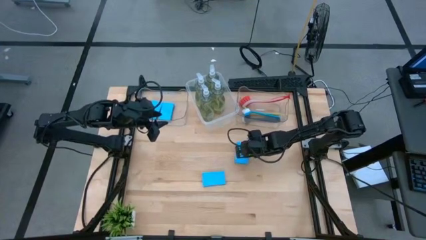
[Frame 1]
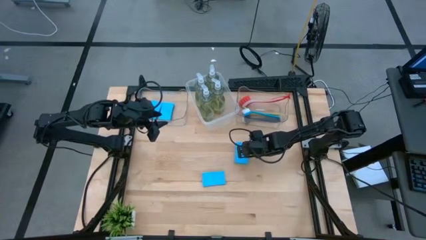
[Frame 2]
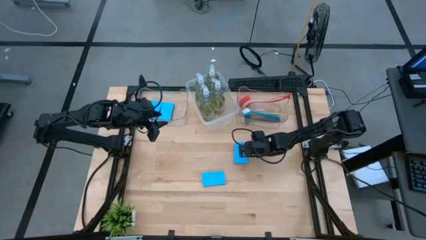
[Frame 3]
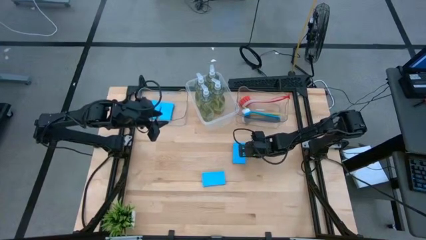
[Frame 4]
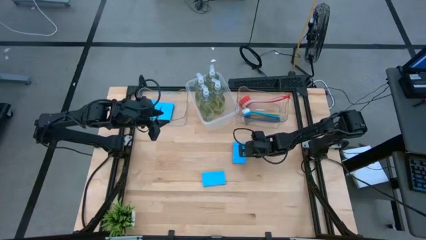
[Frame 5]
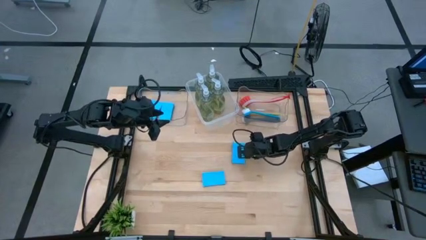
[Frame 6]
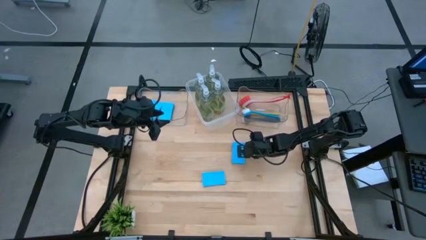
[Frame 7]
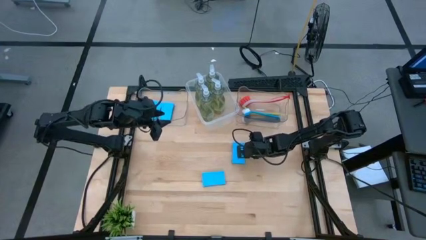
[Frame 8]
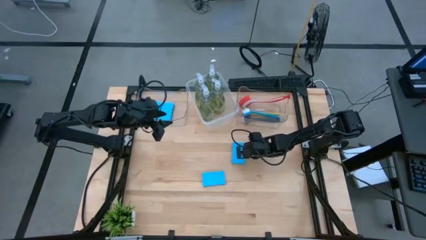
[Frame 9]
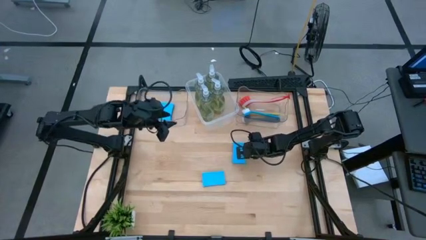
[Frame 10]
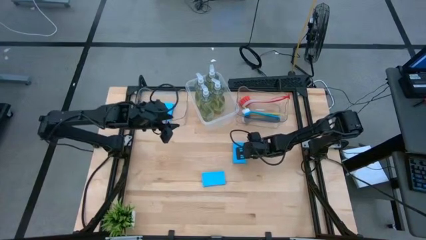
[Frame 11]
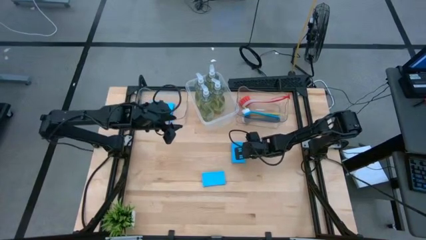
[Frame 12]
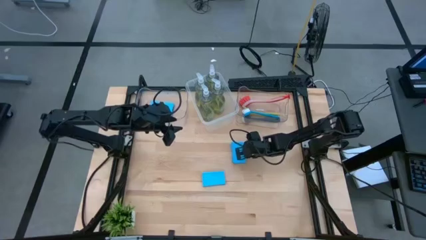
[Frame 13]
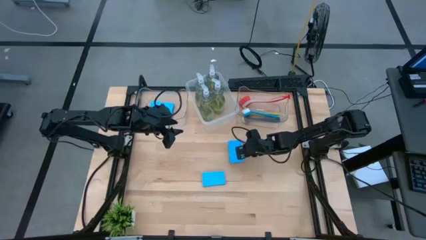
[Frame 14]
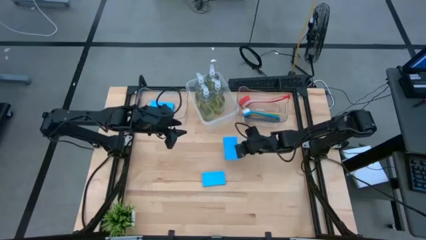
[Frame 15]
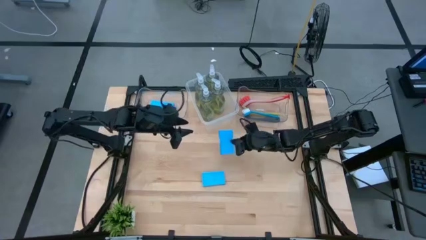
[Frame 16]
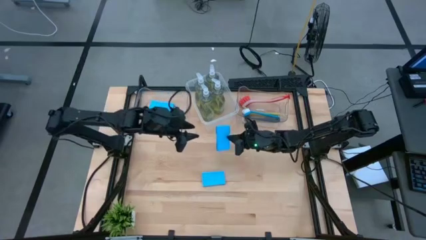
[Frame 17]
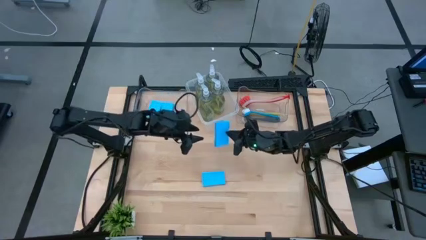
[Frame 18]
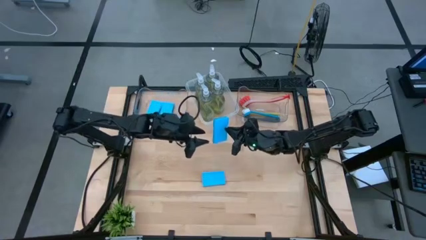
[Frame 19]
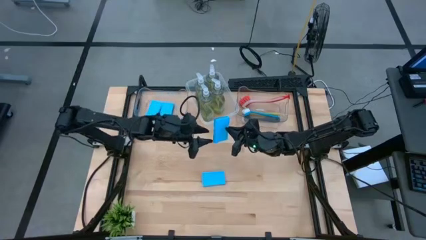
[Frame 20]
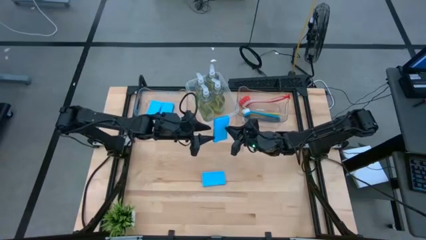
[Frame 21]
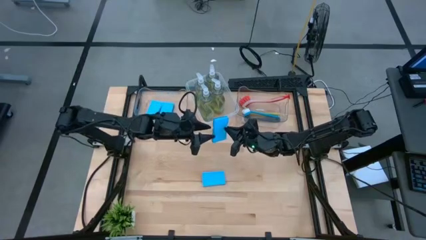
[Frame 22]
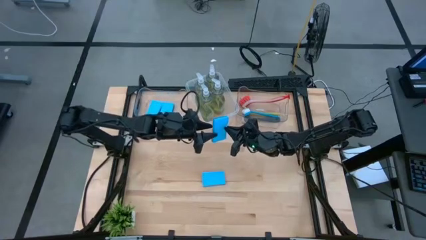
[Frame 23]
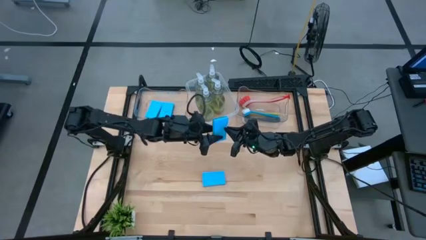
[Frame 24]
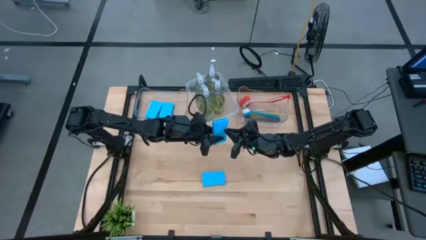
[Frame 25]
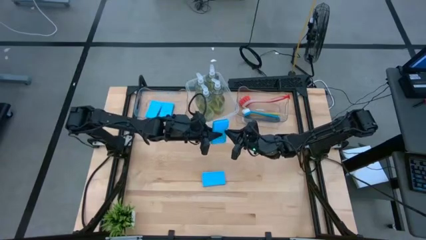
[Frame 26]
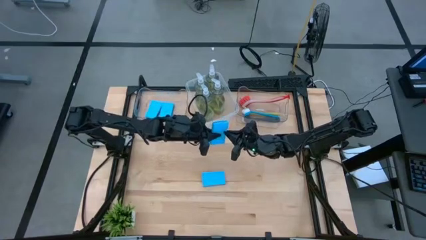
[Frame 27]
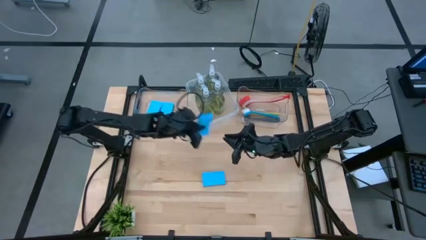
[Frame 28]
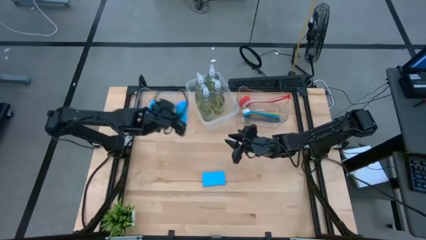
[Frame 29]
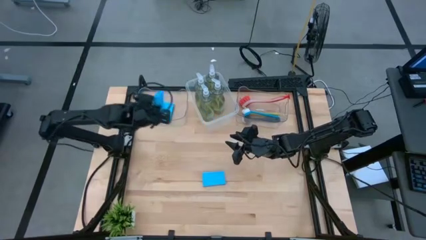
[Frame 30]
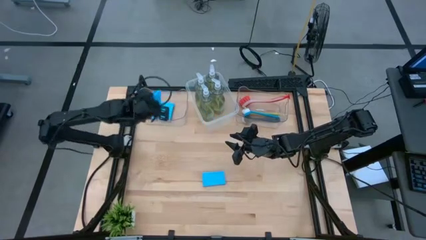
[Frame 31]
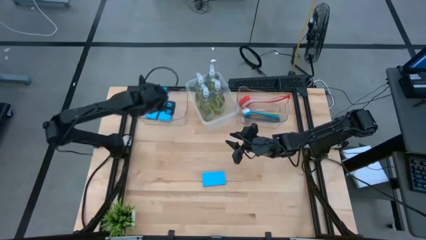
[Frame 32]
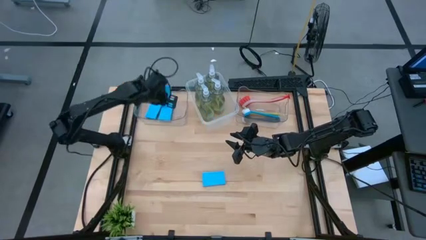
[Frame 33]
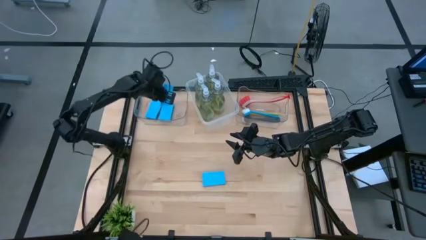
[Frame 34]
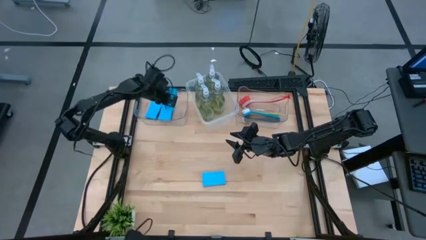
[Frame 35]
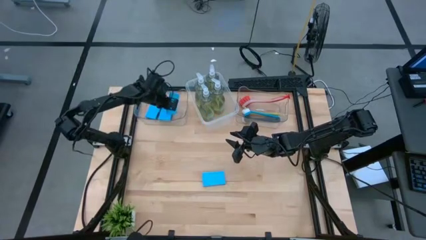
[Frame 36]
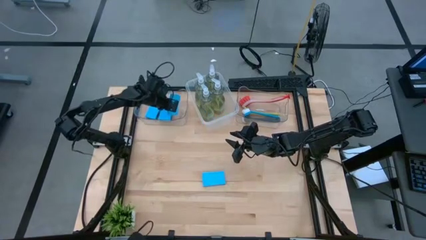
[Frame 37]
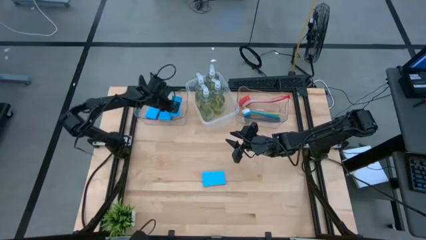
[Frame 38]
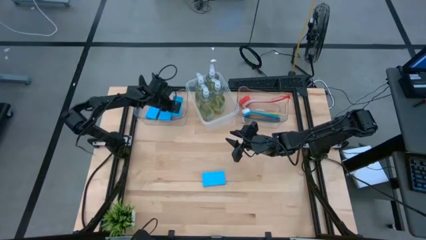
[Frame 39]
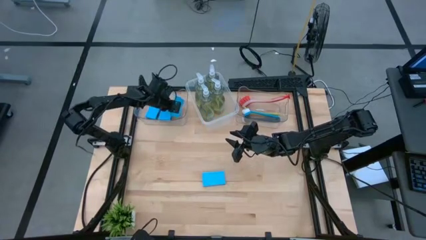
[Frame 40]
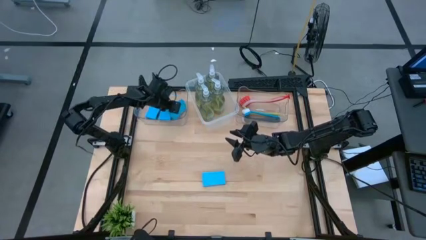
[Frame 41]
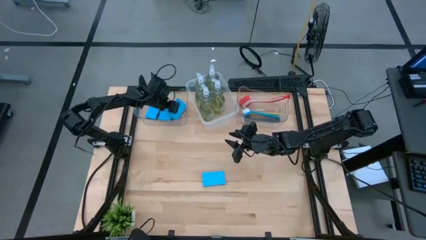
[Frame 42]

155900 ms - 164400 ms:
Task: Pick & Place Kitchen Sink Supplies
Put the sponge into the left transparent bin

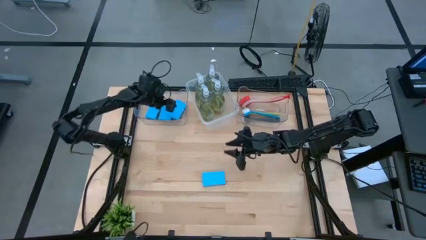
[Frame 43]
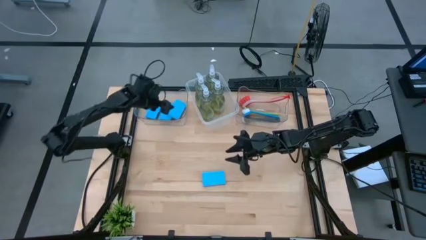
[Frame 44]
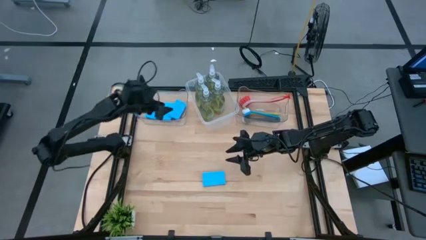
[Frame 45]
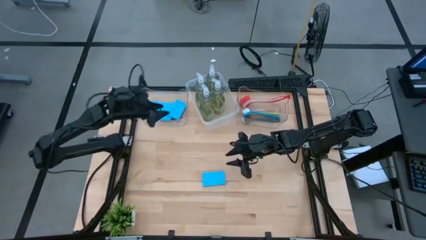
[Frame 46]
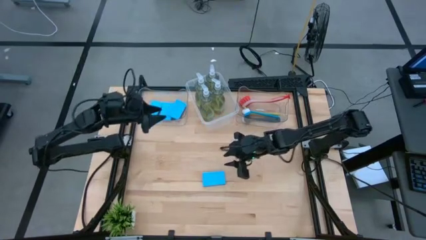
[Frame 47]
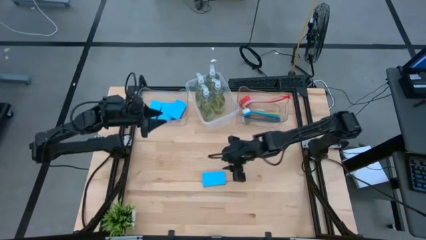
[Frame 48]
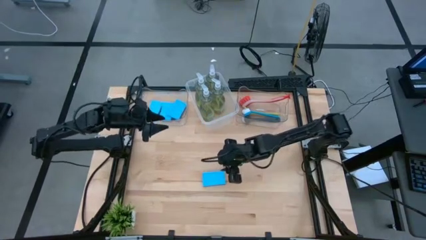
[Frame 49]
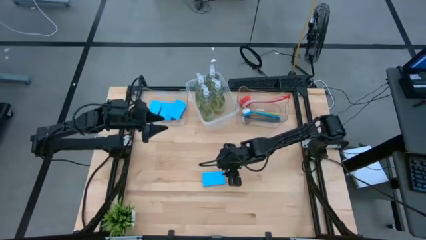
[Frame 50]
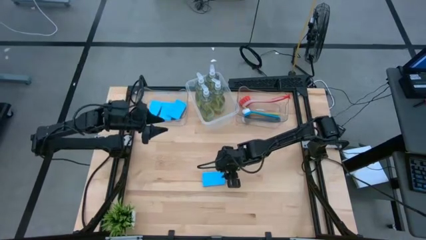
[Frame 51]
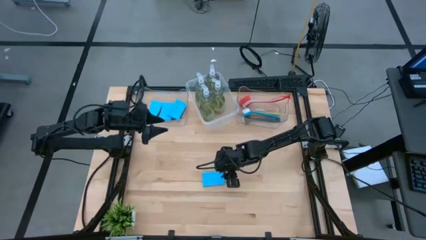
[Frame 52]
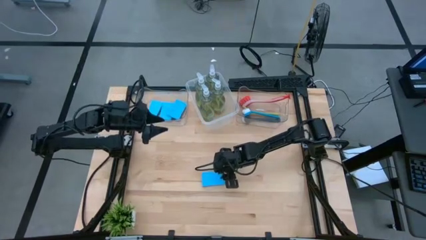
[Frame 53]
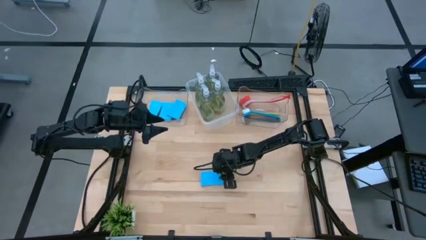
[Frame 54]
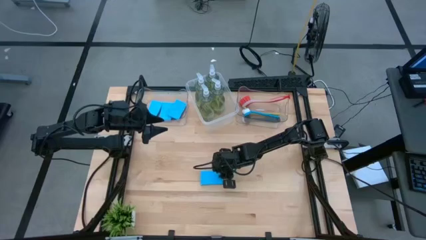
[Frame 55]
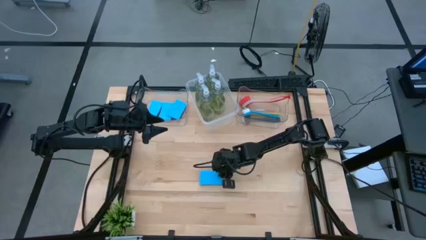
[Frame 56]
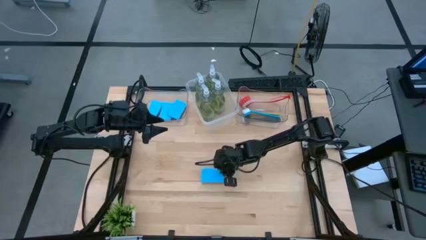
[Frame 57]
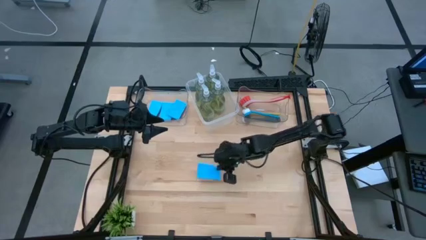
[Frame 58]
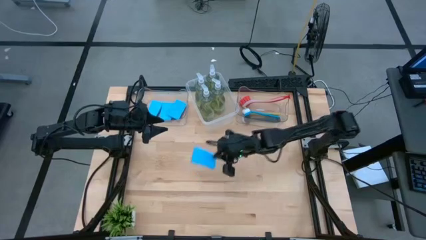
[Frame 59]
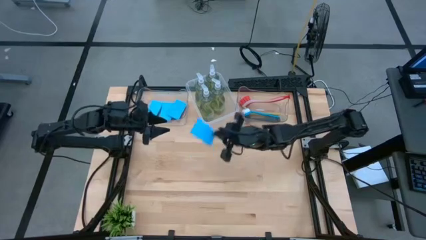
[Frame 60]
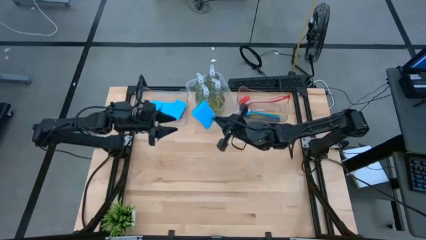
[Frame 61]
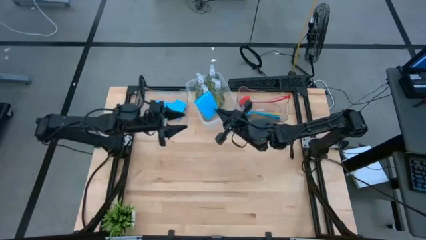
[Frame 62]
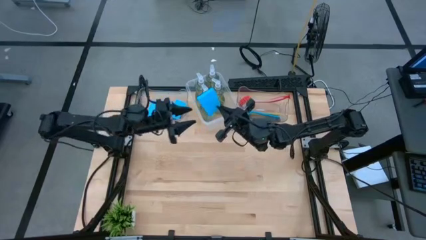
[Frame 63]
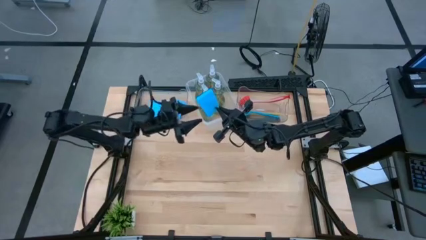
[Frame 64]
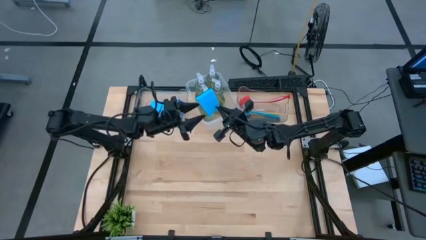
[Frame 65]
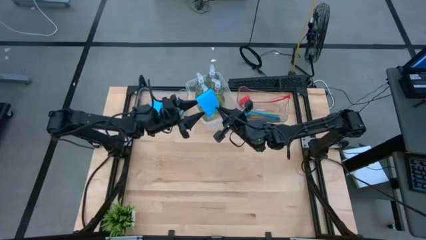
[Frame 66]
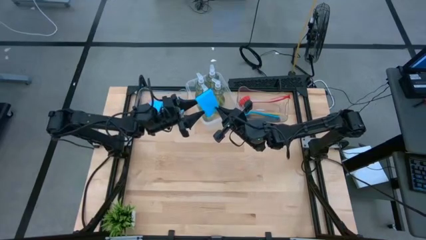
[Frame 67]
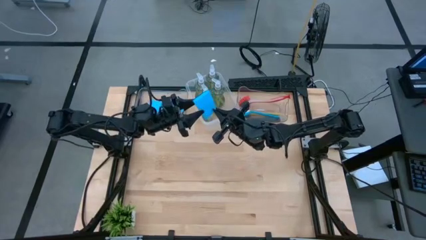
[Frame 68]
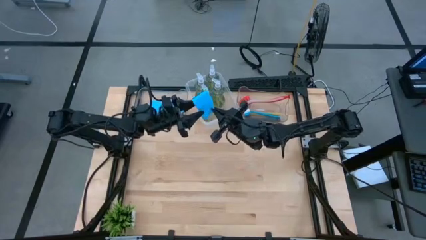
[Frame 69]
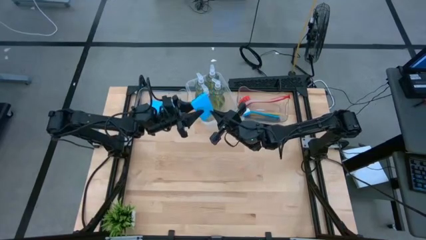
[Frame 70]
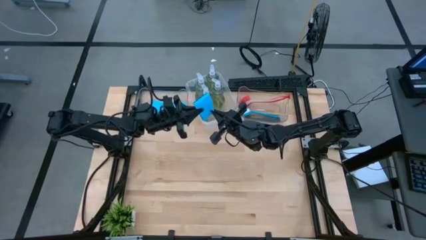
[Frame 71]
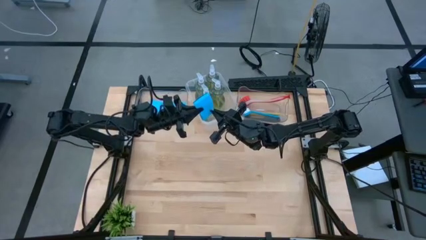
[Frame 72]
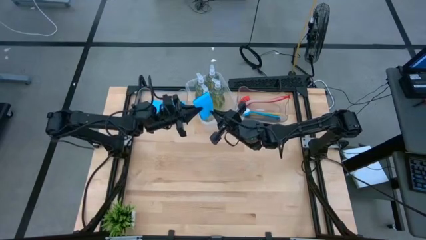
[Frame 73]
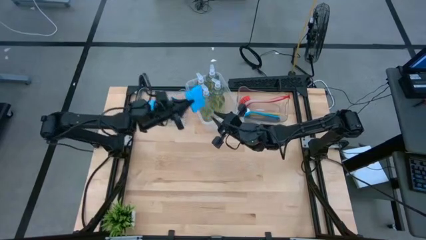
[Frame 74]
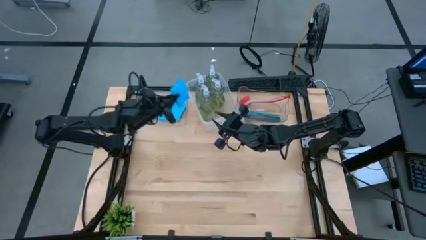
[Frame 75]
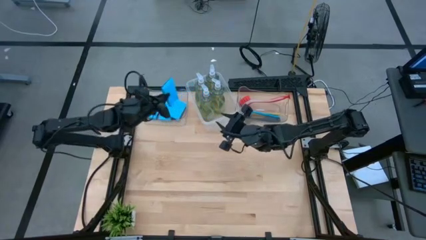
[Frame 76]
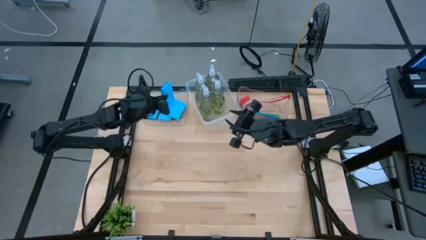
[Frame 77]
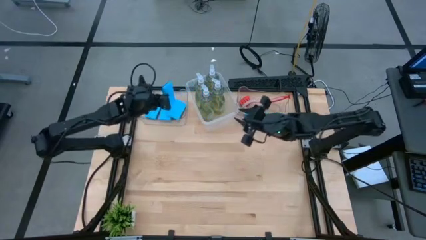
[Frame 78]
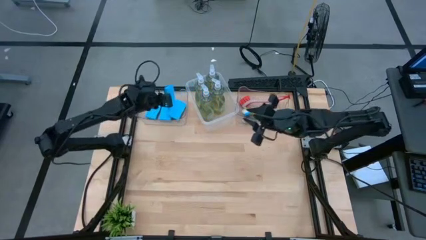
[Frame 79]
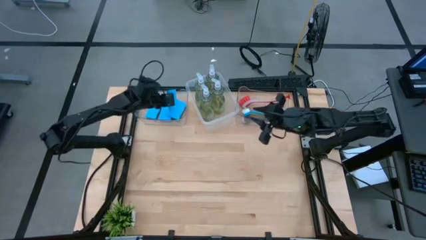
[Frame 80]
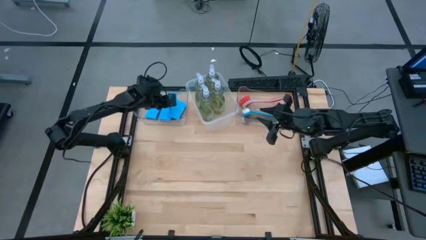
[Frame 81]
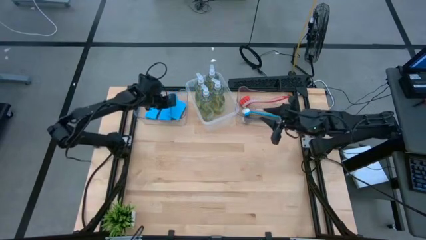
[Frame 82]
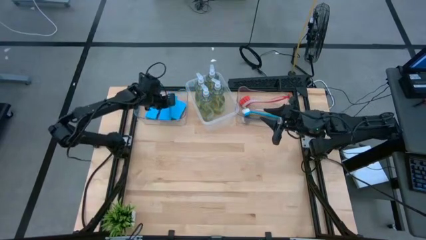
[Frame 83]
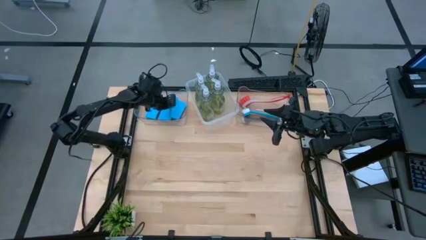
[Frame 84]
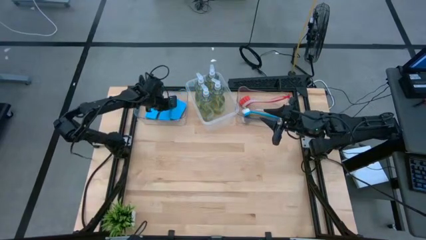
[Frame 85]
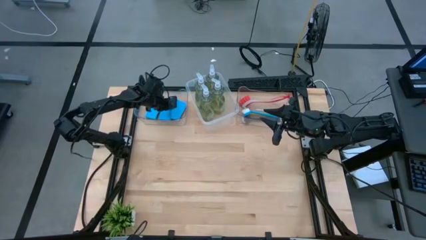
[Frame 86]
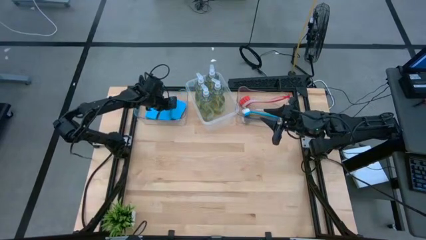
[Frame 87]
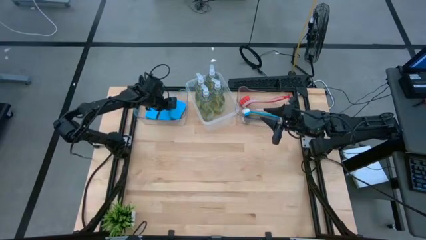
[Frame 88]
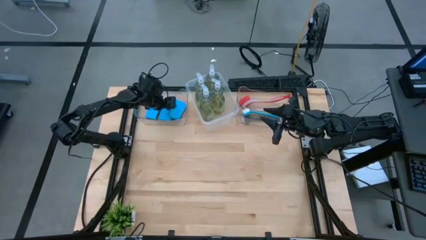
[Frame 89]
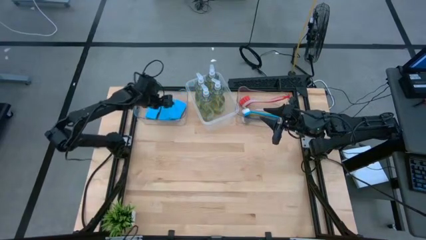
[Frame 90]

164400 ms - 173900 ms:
Put the sponge into the left transparent bin
